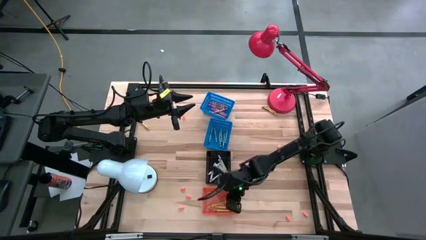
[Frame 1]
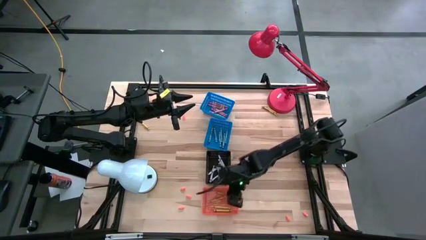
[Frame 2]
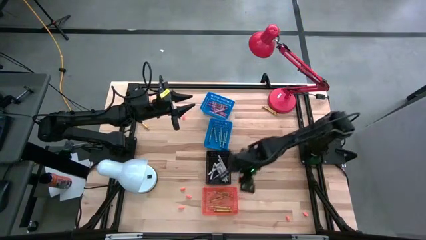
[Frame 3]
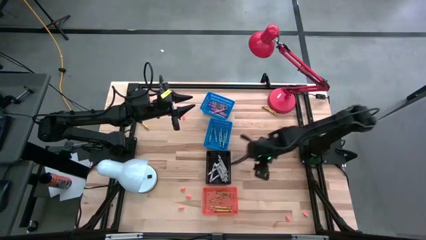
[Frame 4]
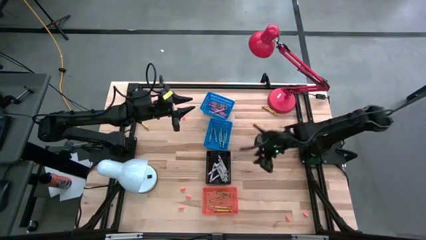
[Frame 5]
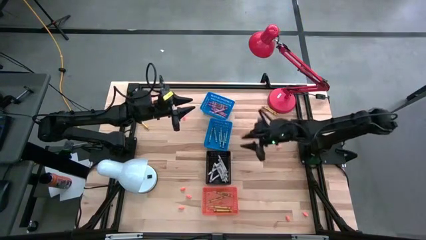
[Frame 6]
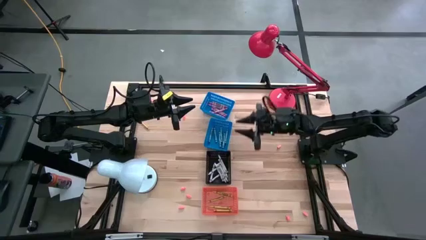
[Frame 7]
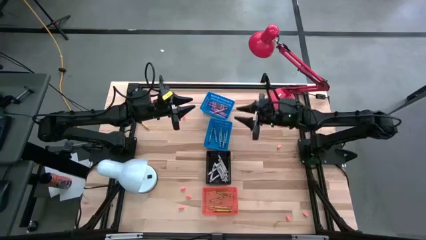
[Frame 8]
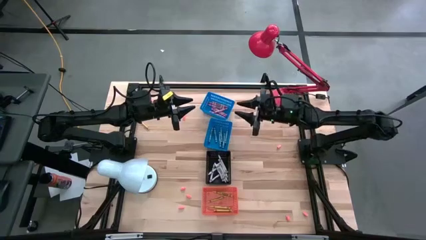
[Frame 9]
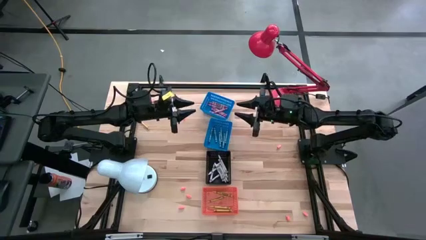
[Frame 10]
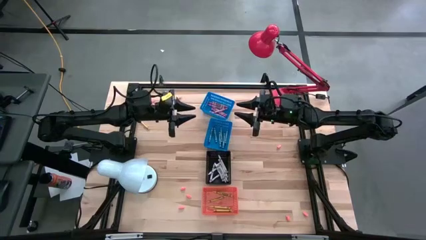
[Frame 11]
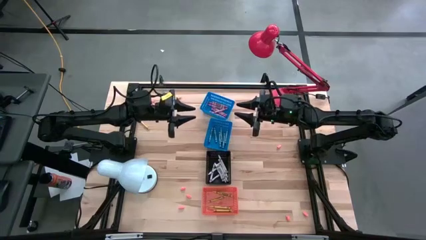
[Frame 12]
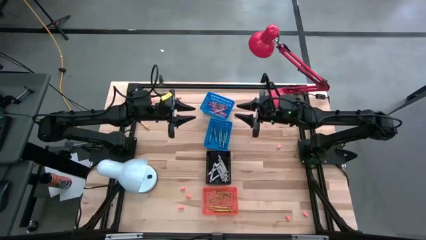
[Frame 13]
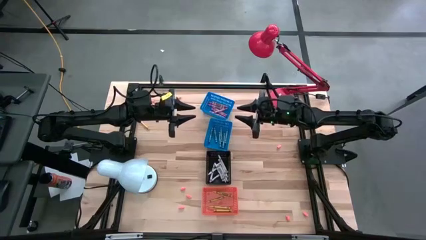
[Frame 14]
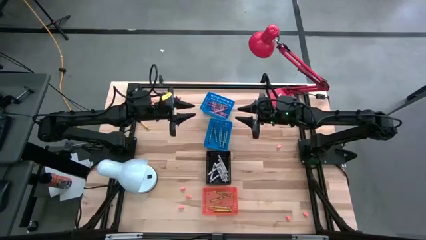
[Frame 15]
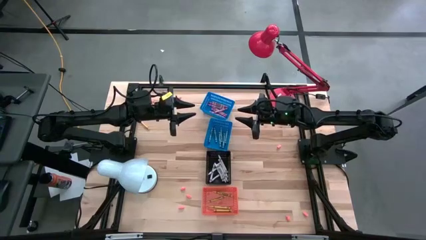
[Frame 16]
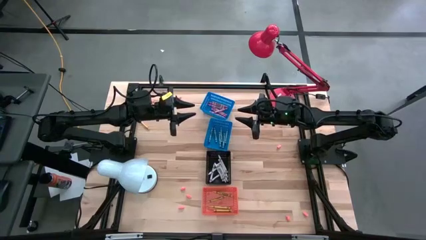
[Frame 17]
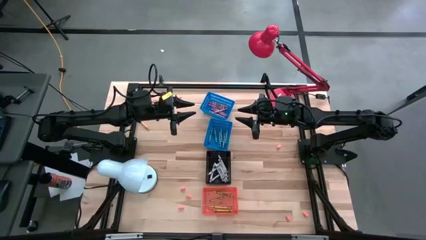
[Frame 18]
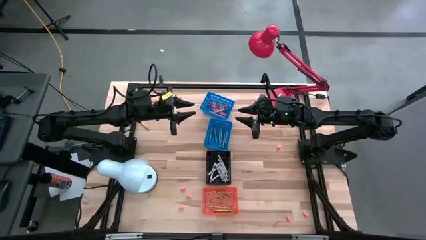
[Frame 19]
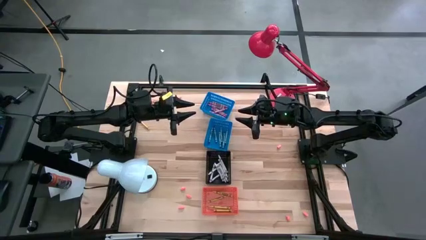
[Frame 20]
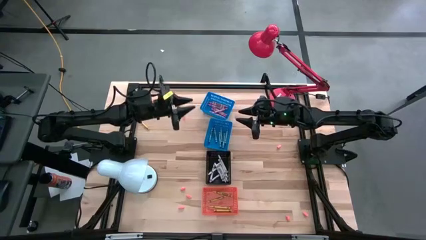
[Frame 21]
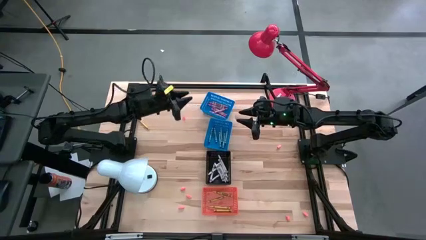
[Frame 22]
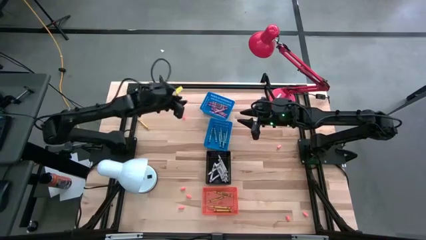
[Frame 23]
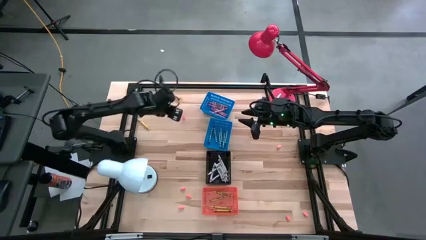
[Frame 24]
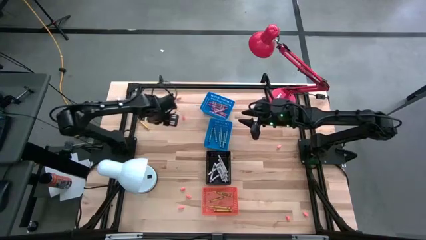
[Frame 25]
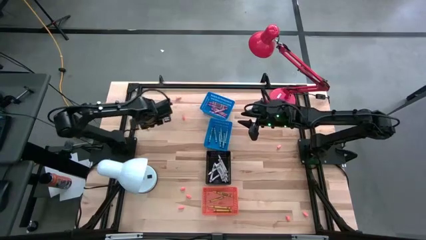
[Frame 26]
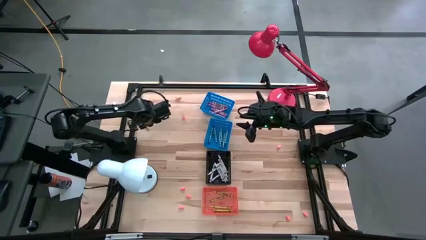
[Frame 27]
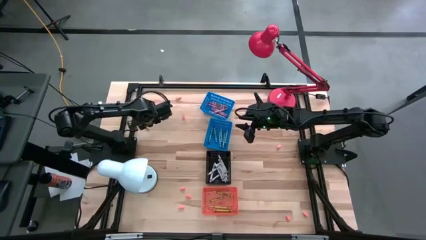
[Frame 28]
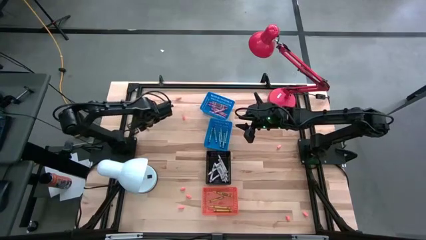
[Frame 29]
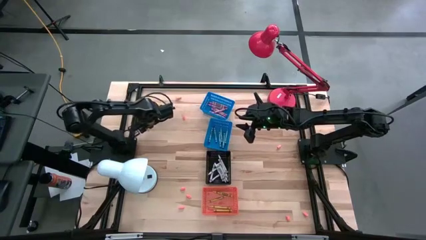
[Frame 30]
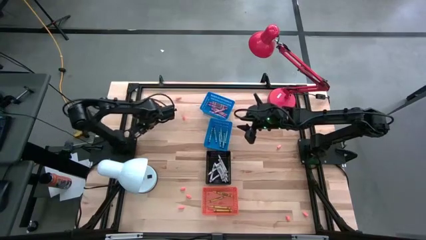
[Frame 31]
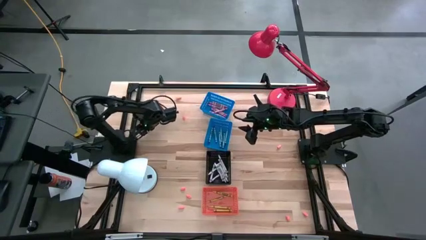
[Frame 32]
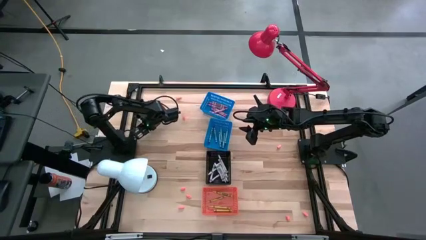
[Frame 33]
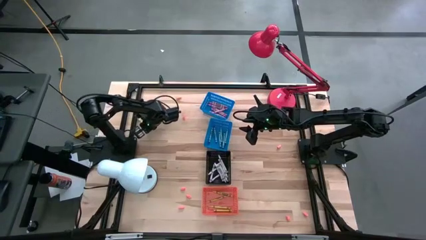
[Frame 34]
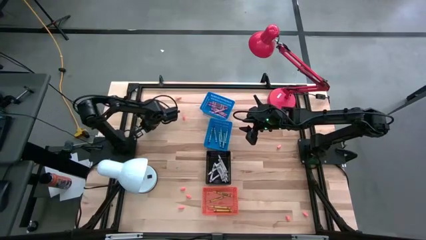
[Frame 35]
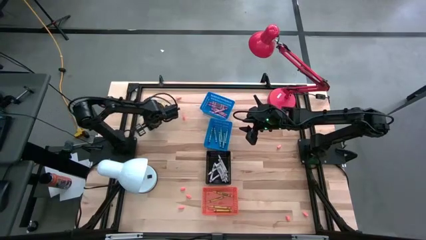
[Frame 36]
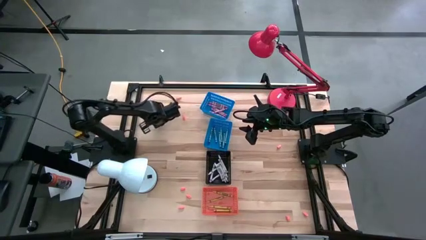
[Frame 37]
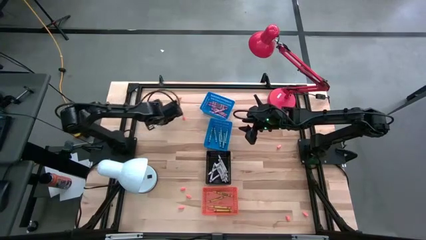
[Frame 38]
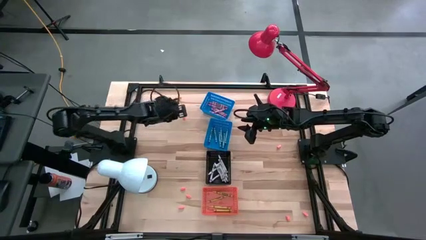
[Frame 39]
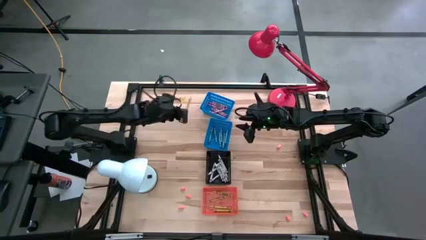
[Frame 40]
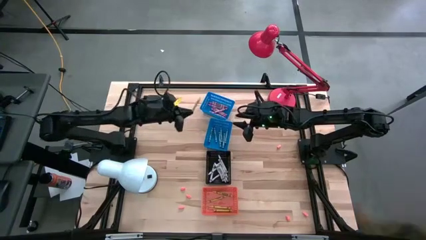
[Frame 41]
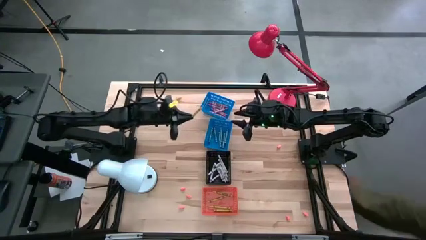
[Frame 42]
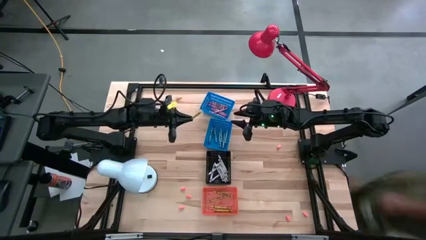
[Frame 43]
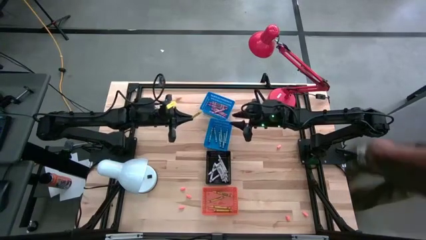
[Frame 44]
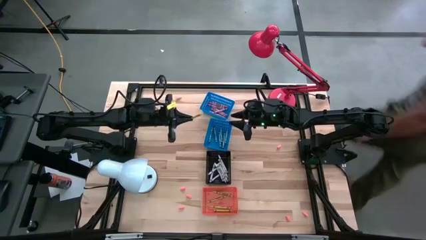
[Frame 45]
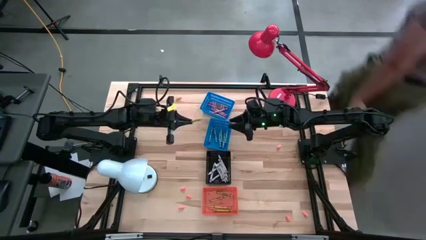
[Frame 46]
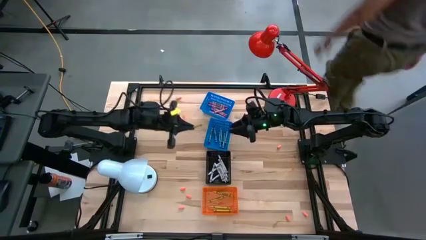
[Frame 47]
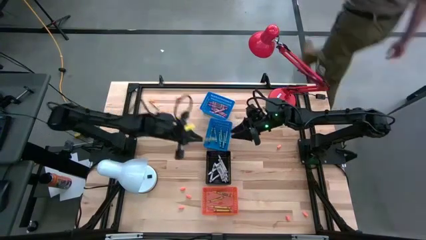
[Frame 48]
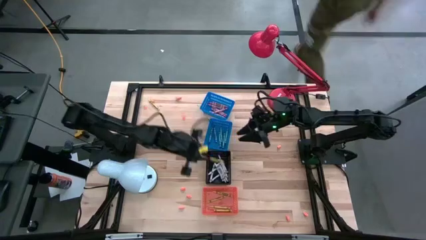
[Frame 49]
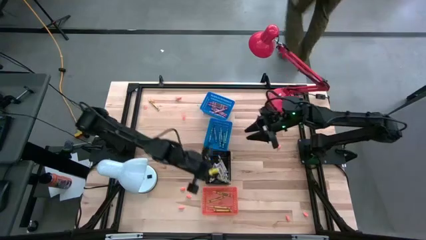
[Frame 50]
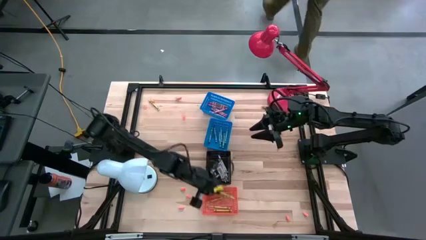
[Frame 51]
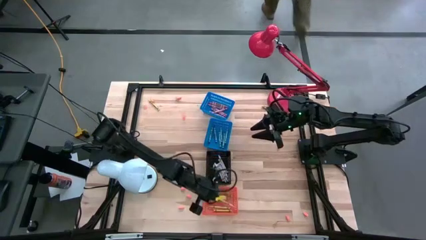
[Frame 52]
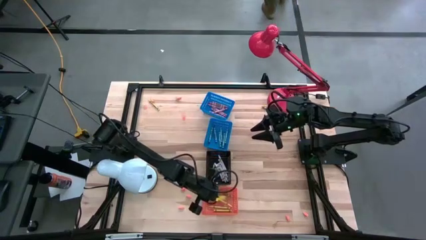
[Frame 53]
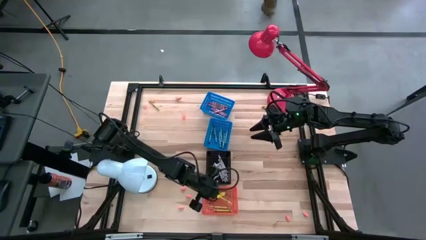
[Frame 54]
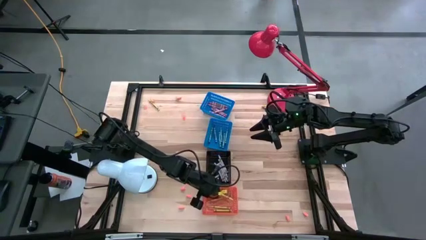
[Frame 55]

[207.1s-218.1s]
Task: Sort crayons
Put the yellow crayon into the orange bin

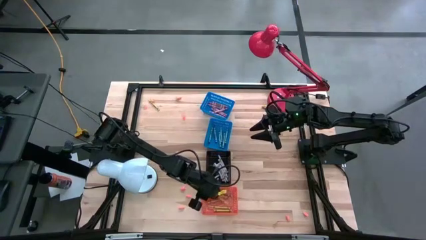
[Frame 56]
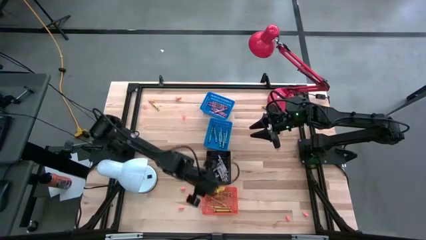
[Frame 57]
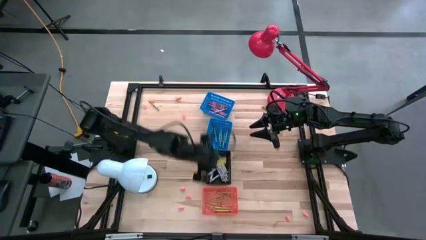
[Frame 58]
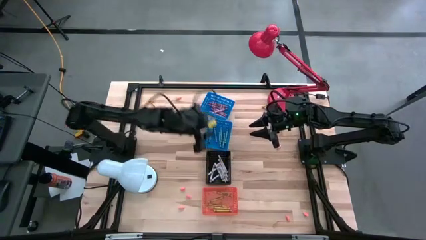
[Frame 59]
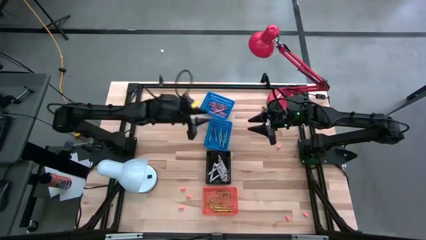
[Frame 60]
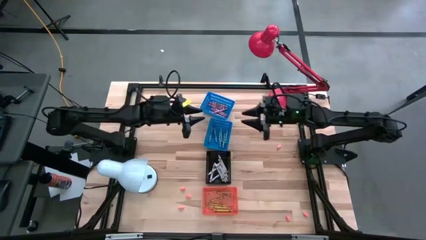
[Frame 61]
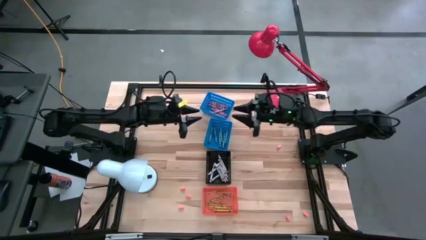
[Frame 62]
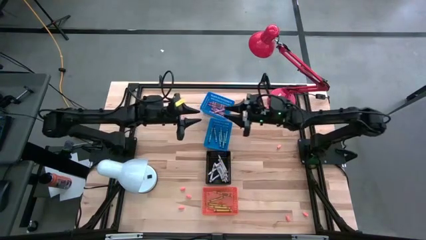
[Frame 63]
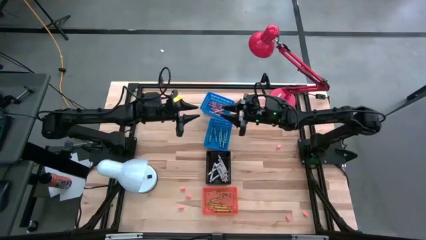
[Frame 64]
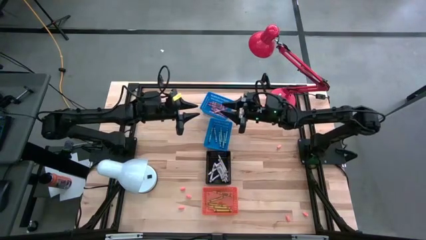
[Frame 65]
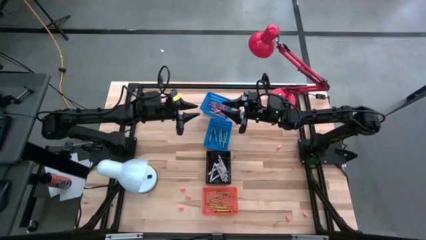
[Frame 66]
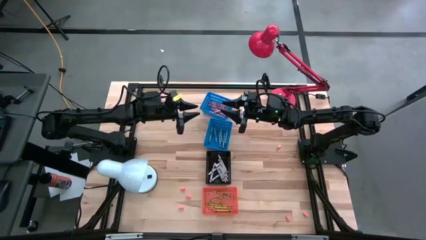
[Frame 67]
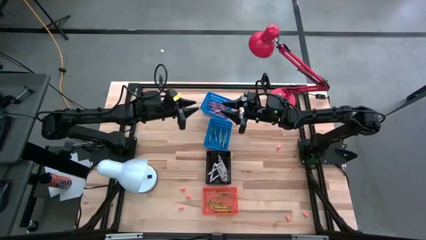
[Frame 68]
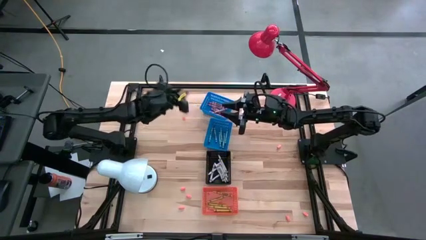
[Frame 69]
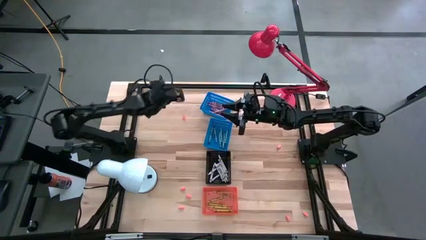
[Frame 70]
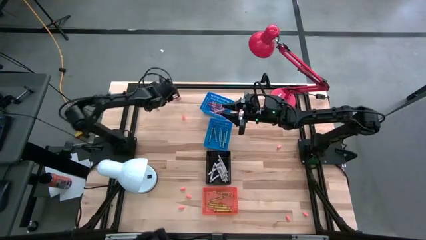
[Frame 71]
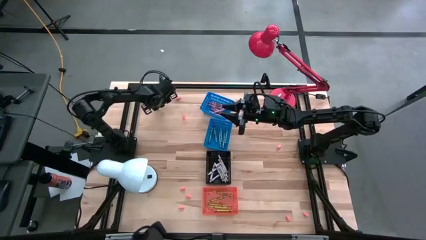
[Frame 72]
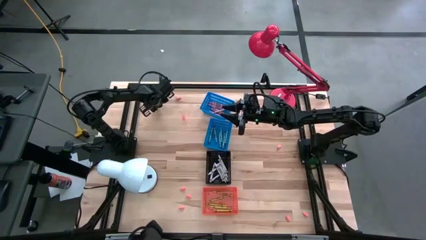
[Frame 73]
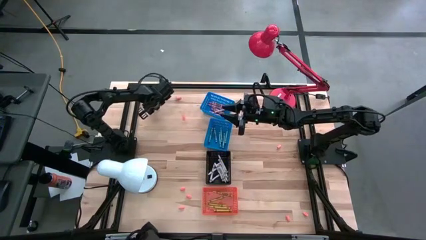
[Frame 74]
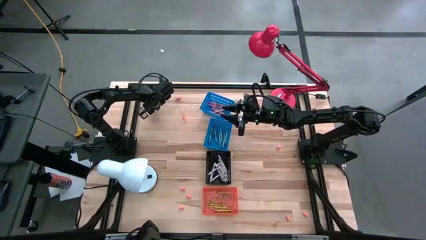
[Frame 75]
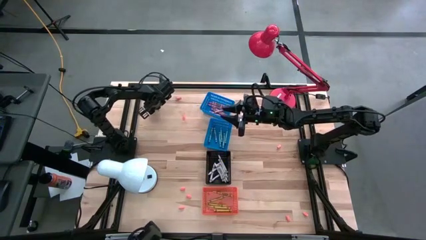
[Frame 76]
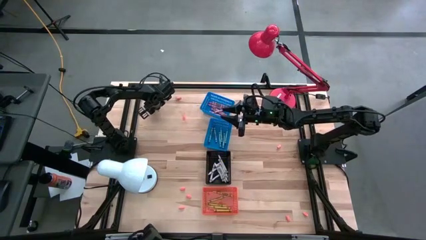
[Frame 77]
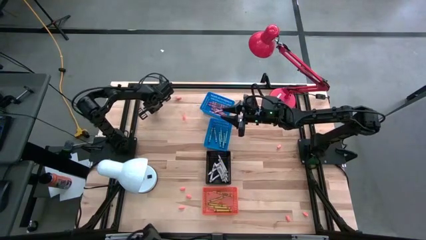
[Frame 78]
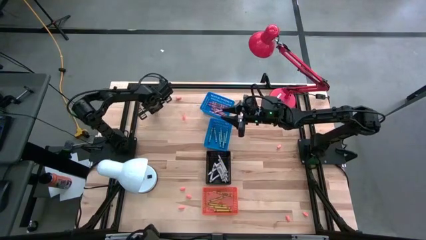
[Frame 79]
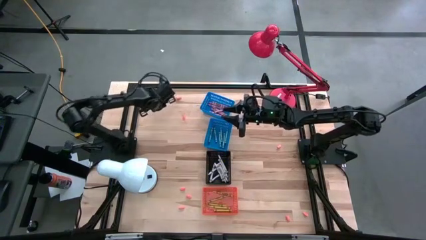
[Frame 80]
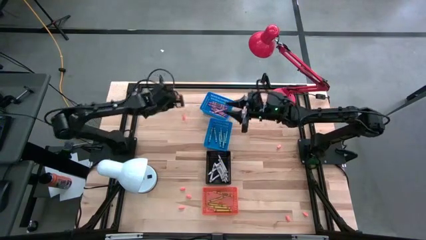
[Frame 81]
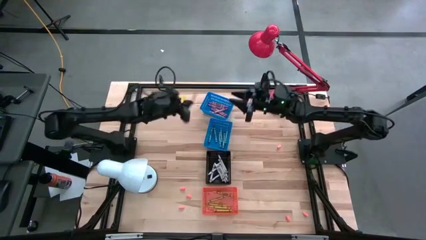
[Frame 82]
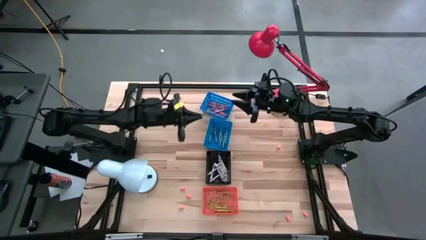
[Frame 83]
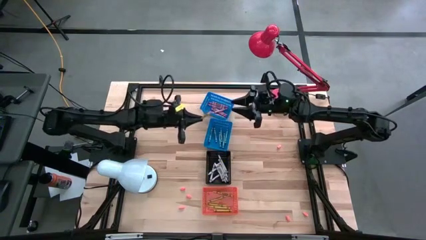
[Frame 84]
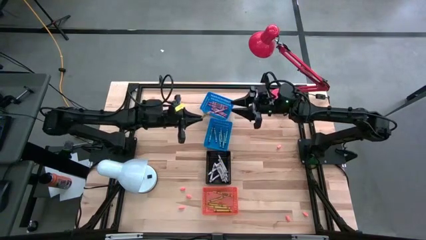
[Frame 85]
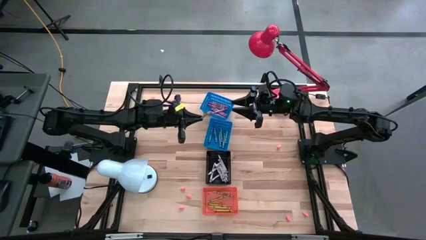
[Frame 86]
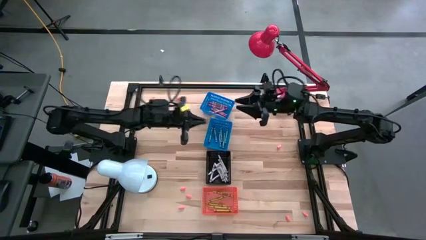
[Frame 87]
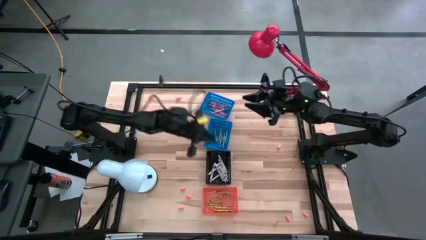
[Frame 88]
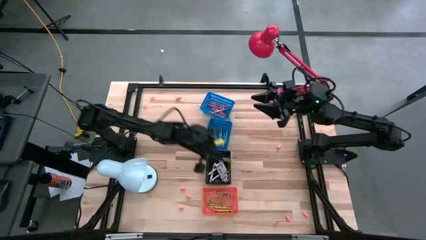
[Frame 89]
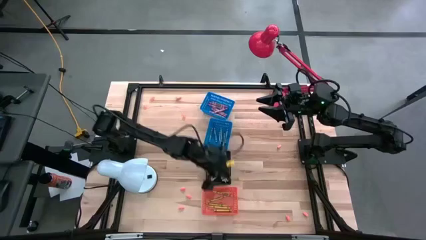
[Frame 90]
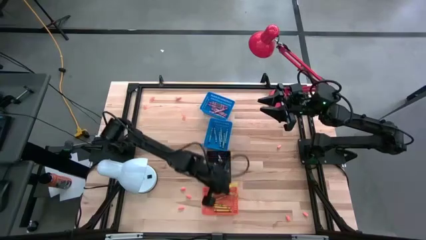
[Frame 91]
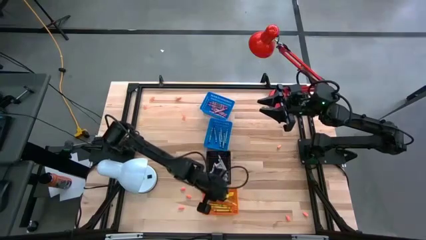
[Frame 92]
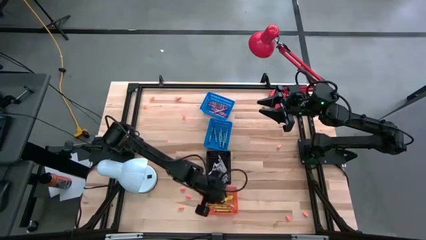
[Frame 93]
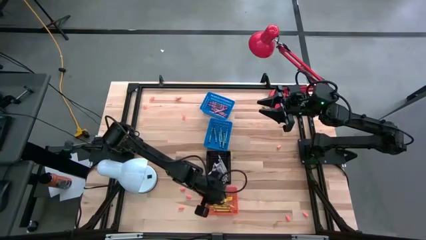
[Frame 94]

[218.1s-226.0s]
Put the yellow crayon into the orange bin
